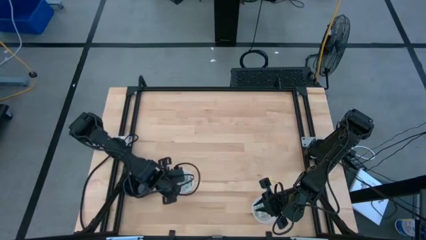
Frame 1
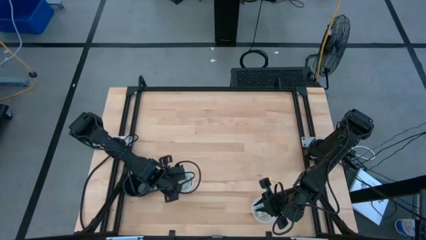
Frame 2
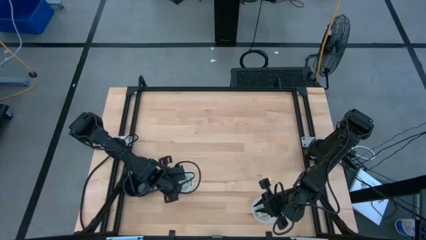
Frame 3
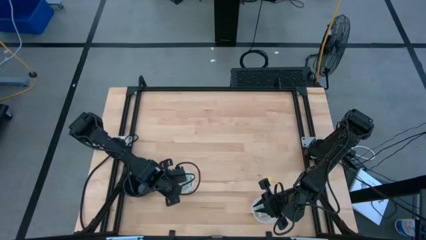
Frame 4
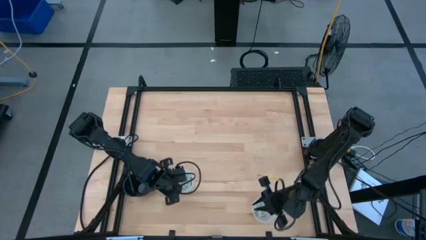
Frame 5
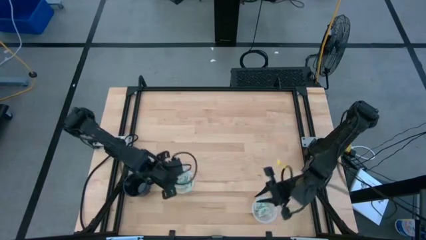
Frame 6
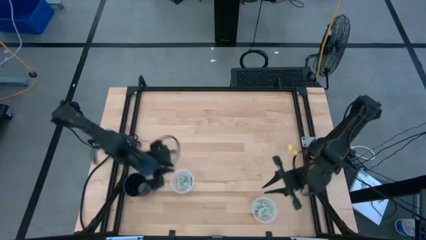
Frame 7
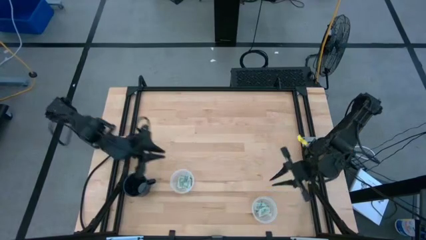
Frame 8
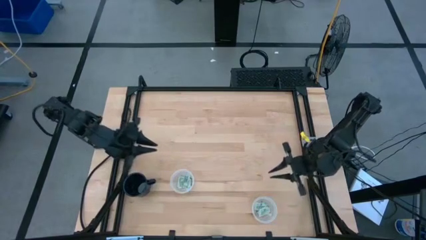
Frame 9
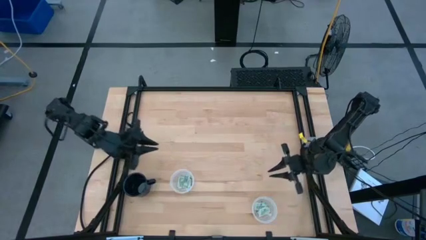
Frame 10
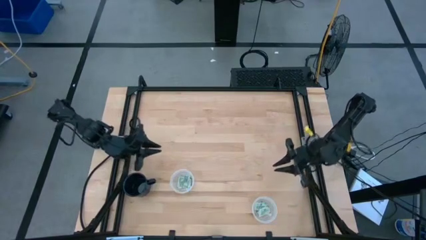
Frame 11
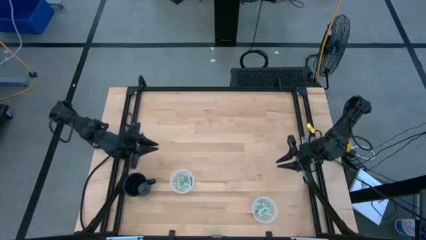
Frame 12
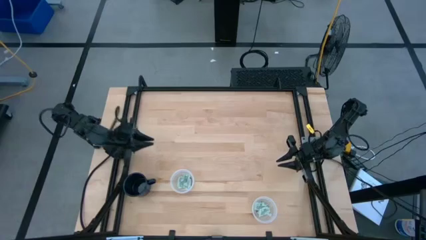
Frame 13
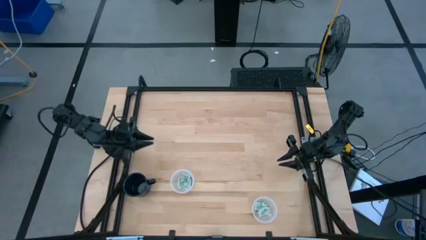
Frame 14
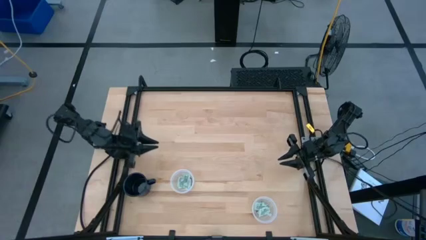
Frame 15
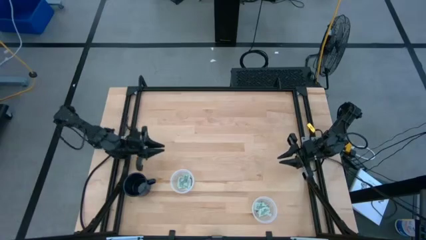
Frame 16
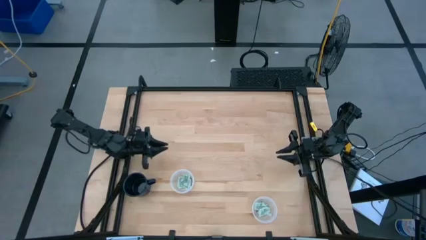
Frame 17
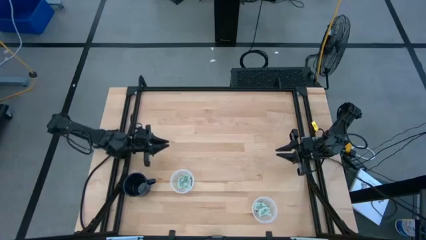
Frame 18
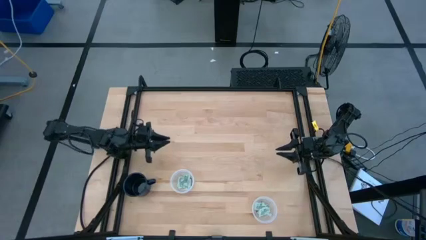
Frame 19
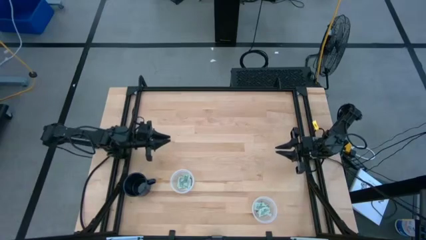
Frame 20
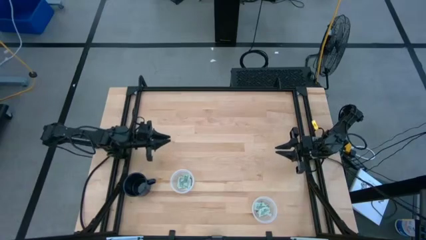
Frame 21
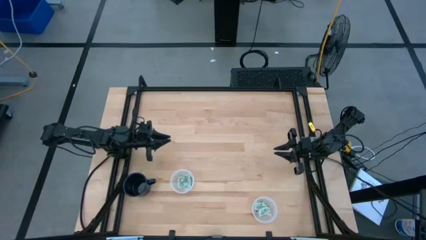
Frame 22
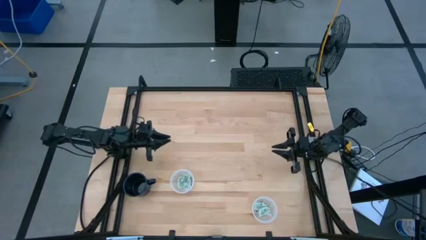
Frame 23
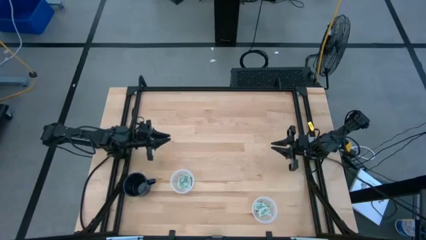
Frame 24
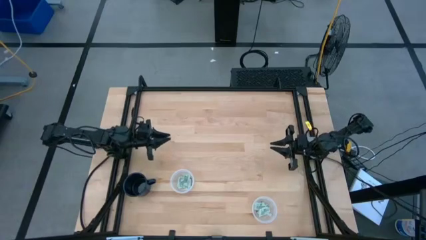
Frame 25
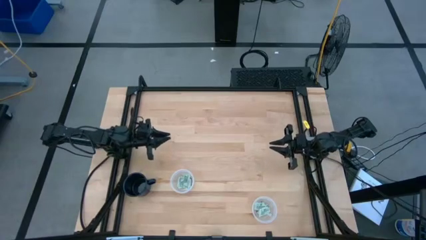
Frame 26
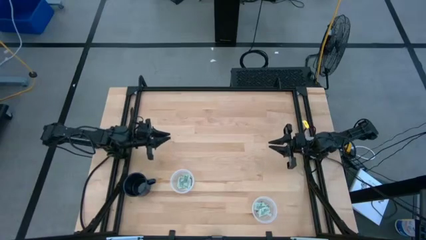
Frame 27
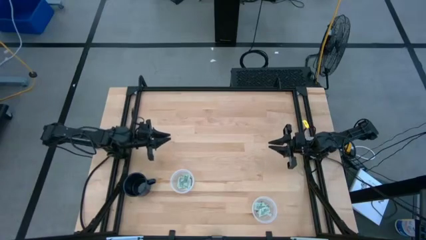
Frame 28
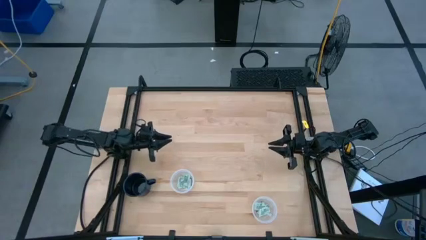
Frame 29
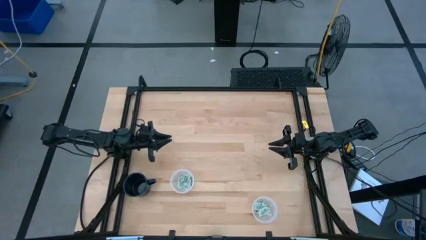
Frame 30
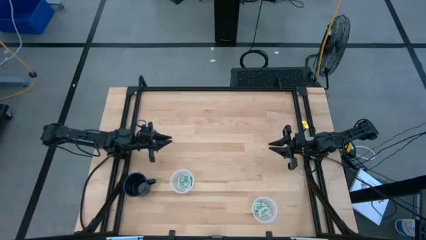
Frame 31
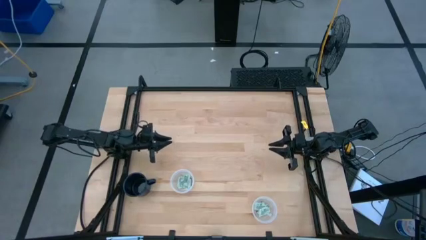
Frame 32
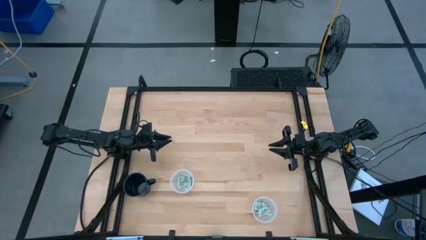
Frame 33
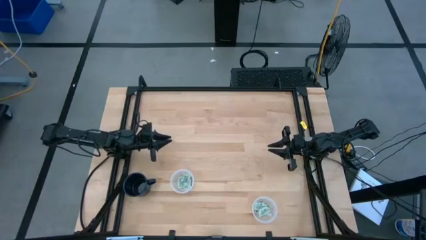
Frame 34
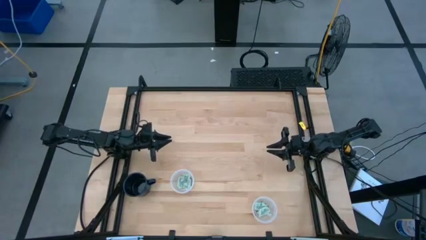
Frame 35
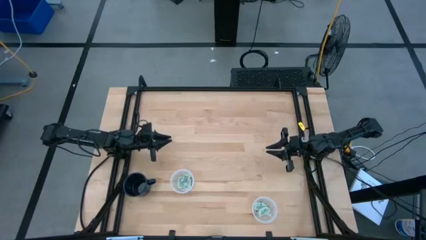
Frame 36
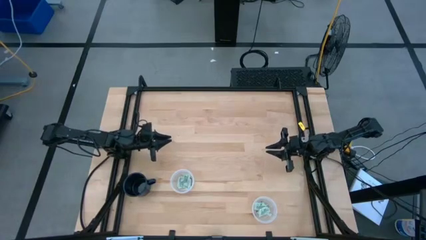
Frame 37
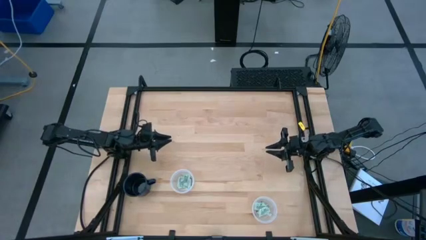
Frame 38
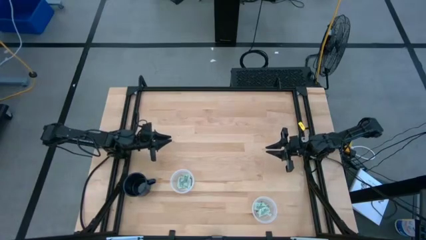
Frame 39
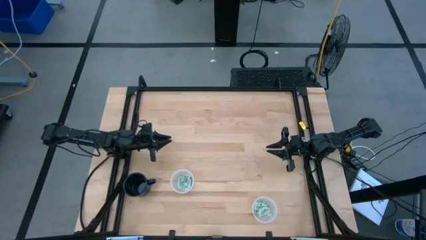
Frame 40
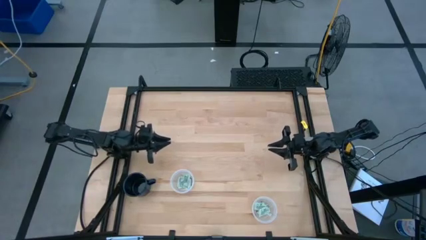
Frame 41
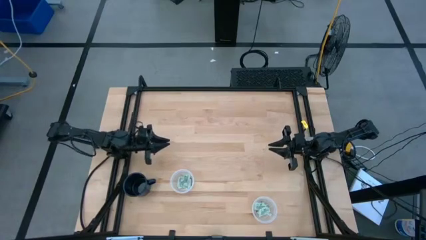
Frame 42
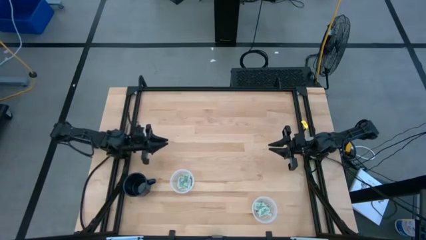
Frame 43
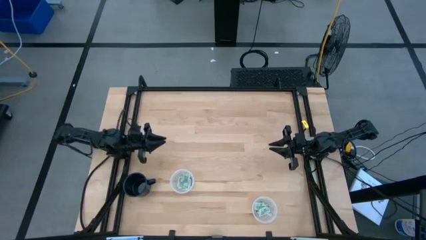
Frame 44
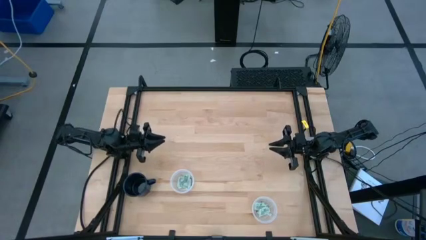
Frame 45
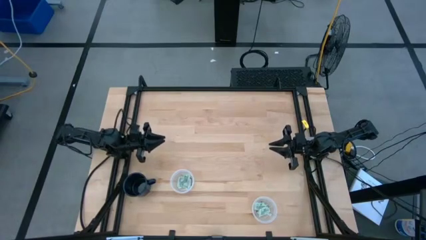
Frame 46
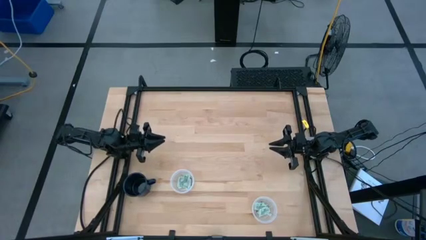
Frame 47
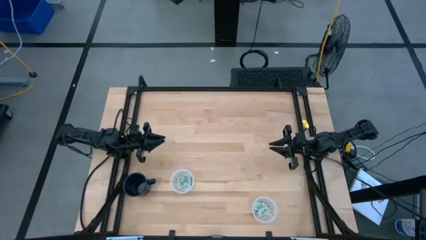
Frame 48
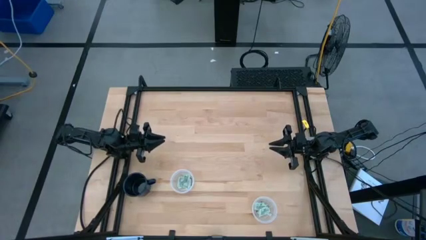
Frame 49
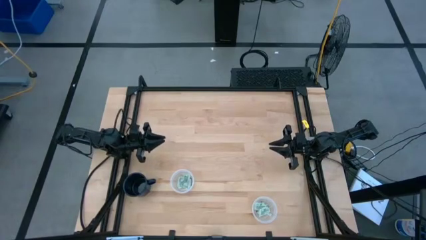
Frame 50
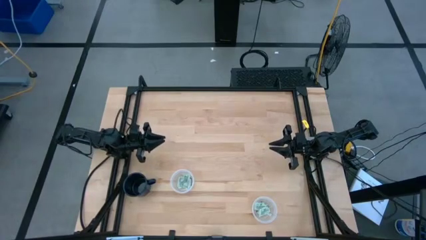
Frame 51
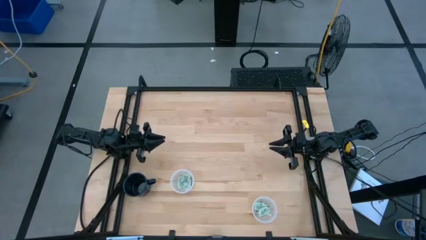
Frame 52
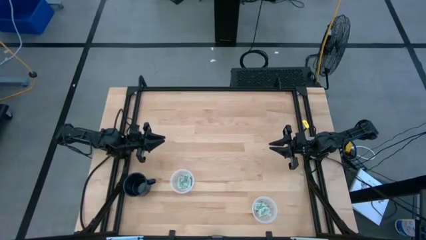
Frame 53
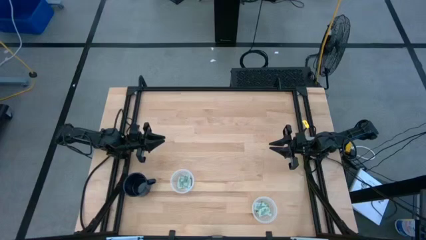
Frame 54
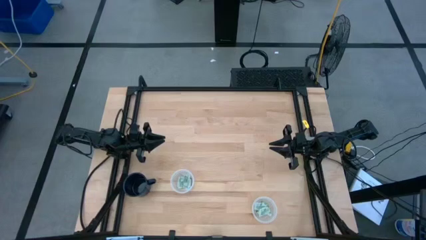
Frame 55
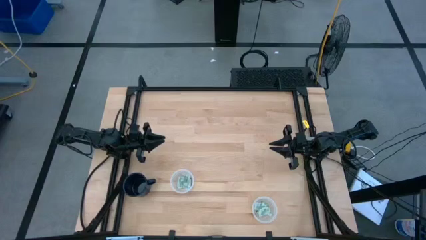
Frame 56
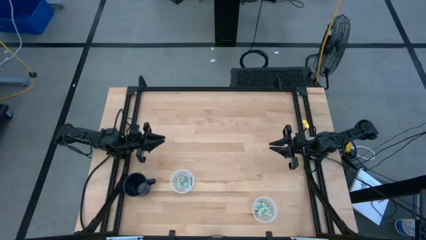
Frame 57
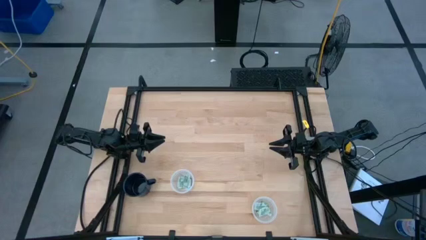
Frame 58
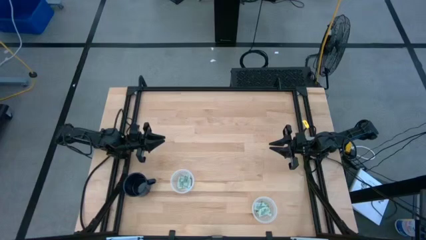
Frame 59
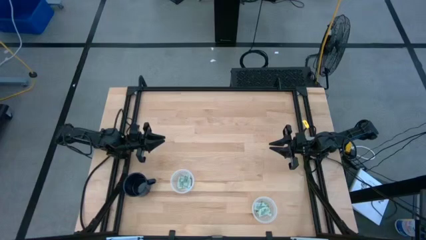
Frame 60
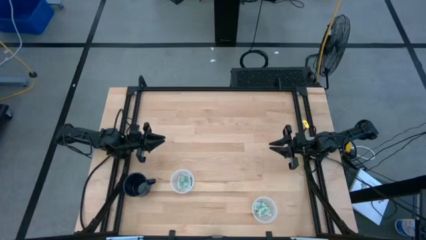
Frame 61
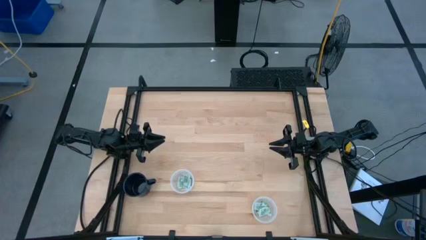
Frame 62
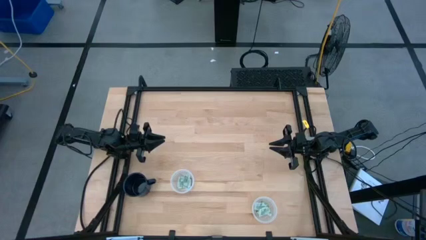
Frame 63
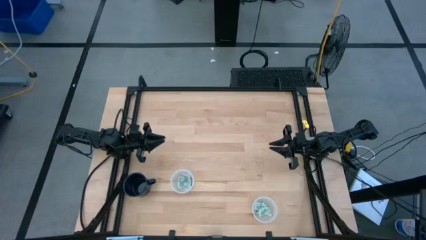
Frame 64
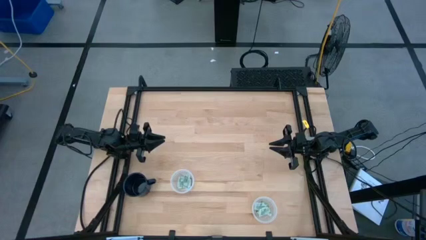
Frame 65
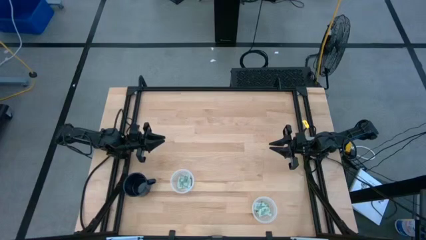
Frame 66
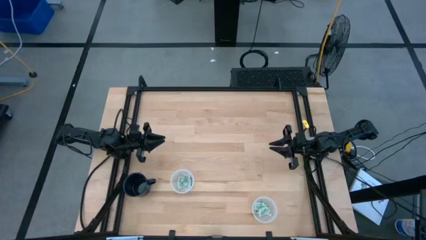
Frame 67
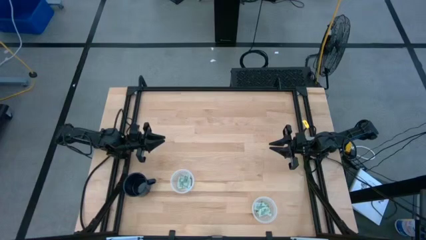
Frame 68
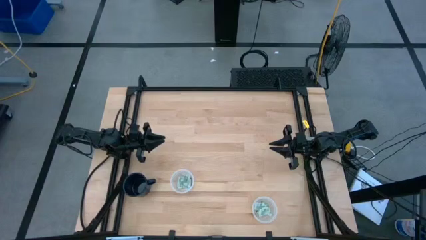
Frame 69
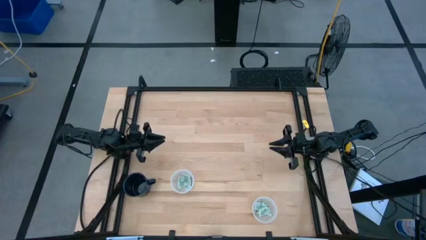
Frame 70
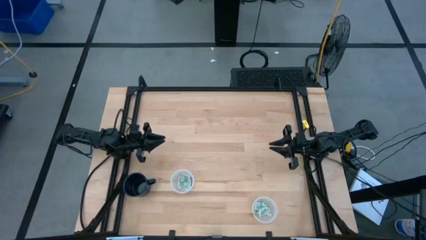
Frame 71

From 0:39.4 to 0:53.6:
Task: Pick and place items into bin
Return to Home Position
